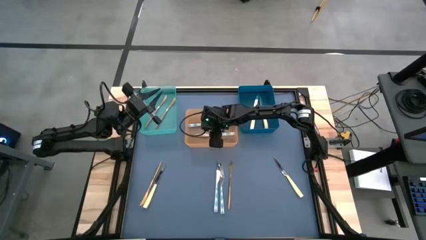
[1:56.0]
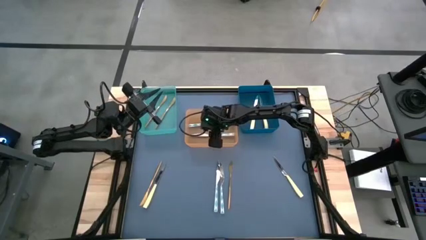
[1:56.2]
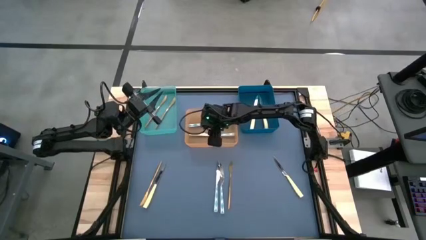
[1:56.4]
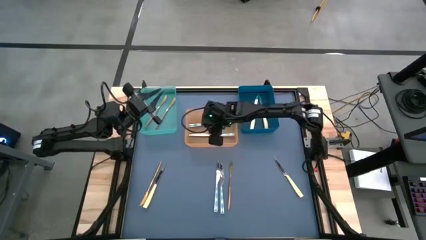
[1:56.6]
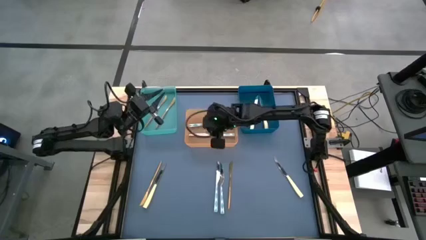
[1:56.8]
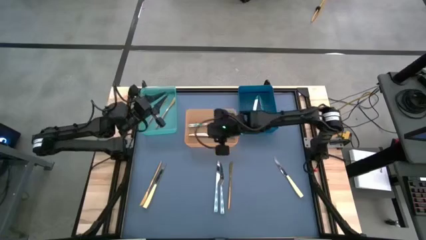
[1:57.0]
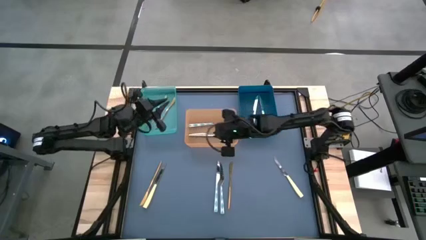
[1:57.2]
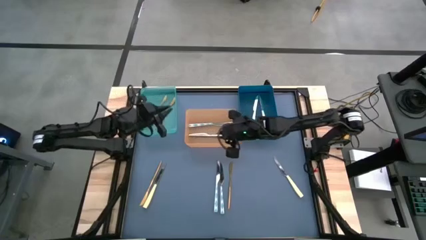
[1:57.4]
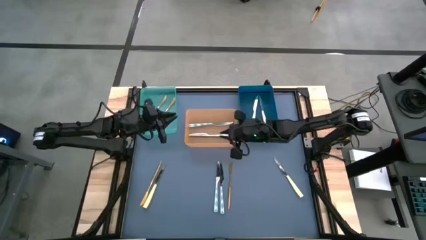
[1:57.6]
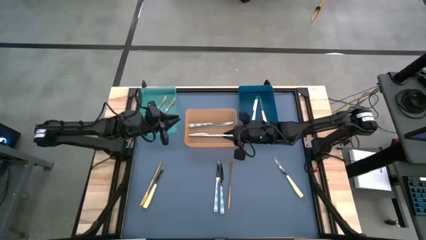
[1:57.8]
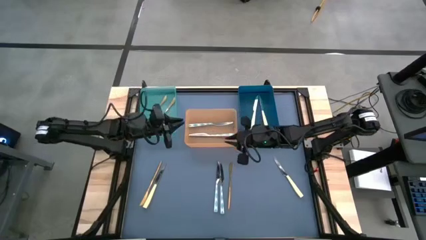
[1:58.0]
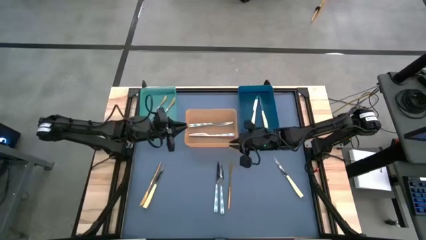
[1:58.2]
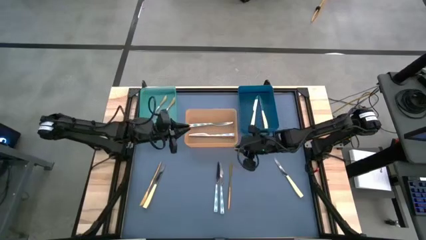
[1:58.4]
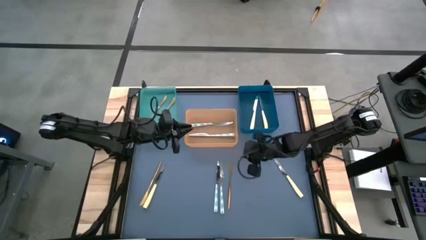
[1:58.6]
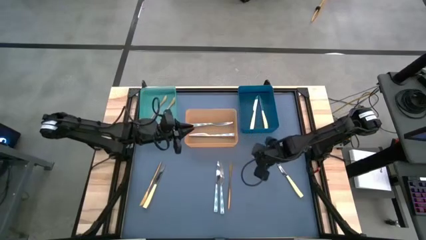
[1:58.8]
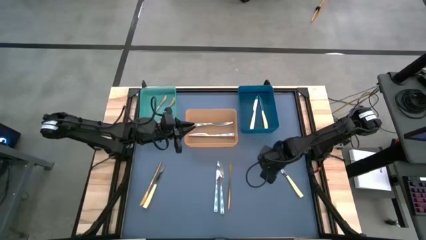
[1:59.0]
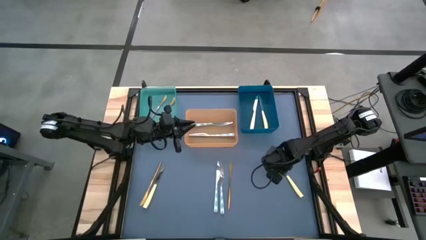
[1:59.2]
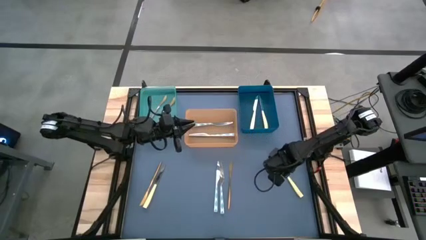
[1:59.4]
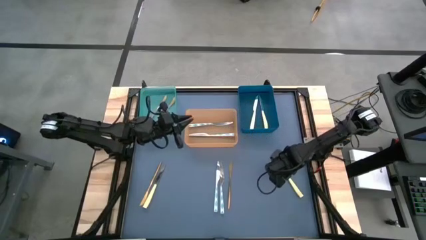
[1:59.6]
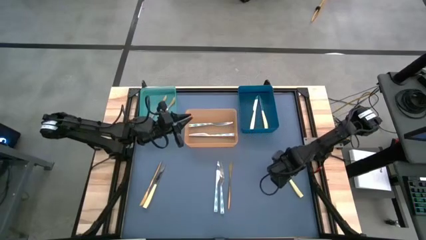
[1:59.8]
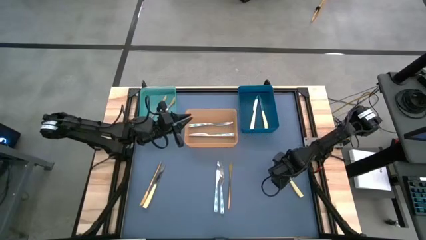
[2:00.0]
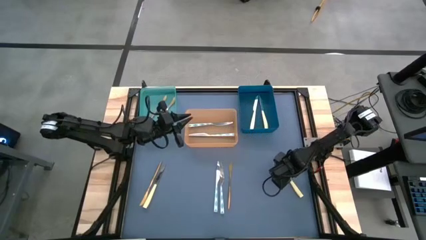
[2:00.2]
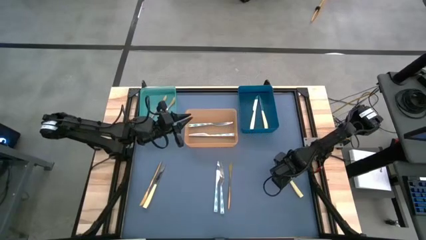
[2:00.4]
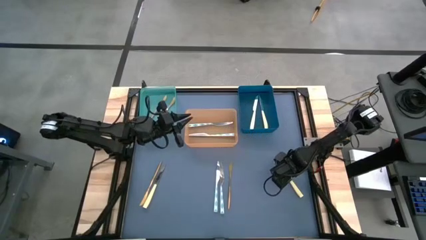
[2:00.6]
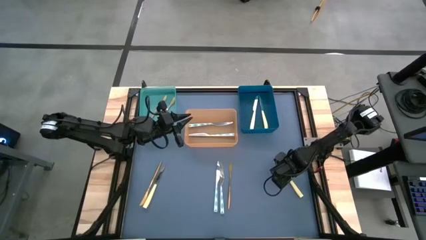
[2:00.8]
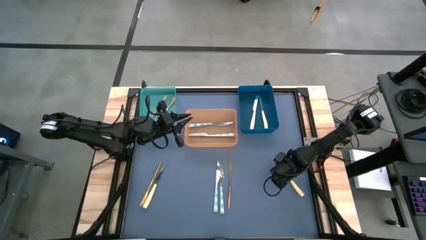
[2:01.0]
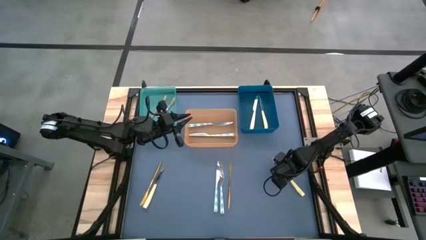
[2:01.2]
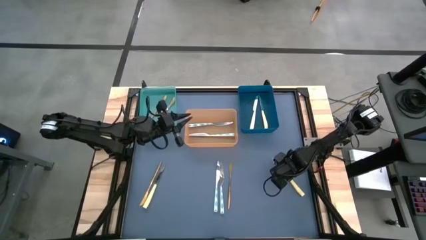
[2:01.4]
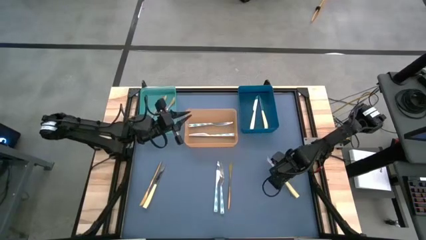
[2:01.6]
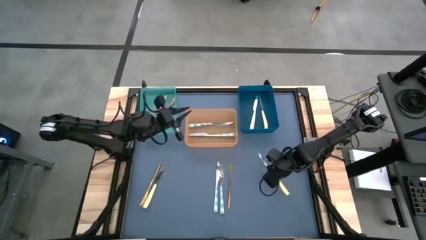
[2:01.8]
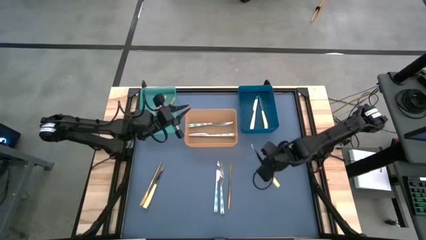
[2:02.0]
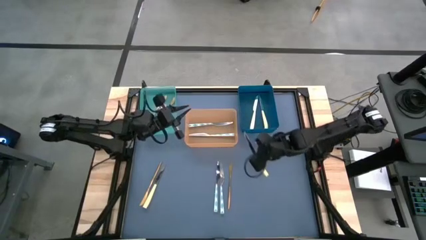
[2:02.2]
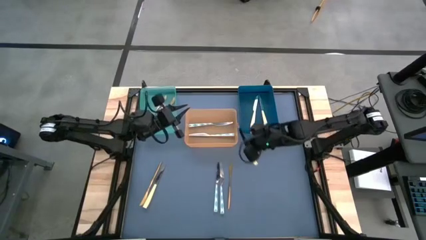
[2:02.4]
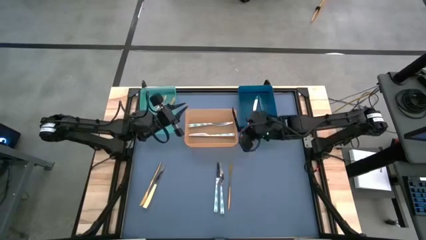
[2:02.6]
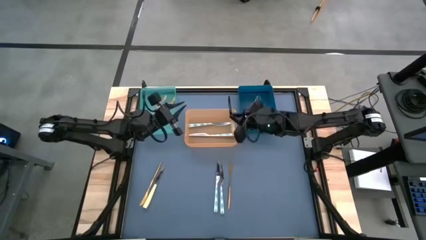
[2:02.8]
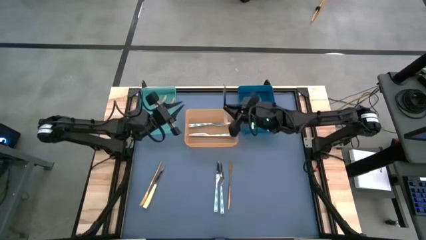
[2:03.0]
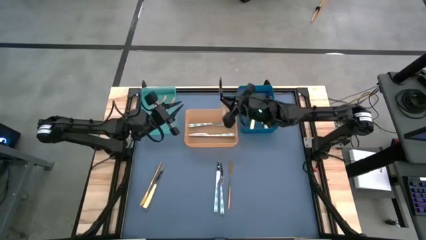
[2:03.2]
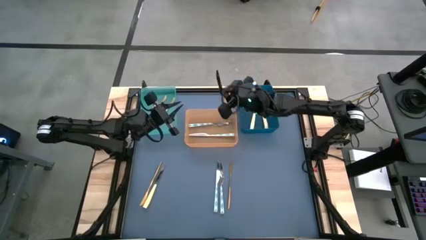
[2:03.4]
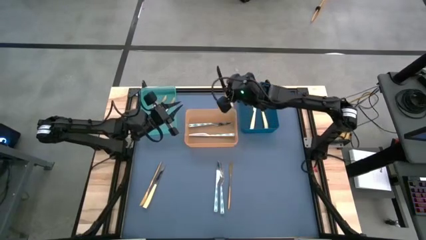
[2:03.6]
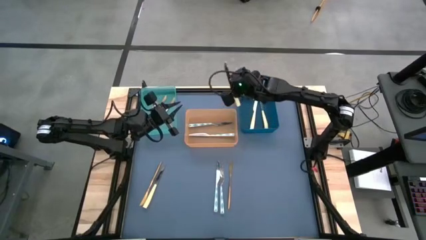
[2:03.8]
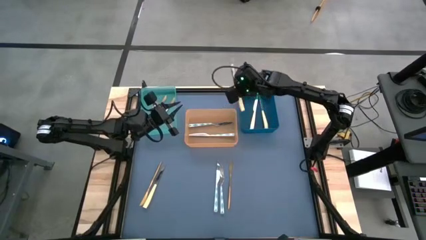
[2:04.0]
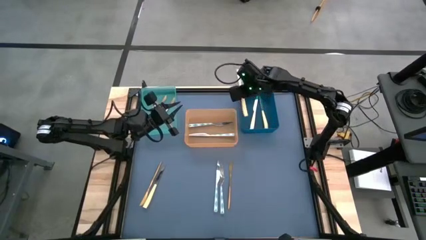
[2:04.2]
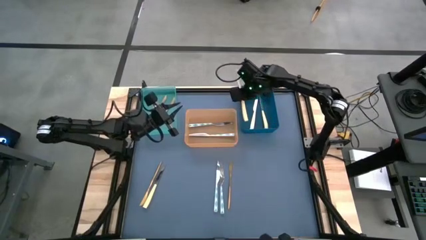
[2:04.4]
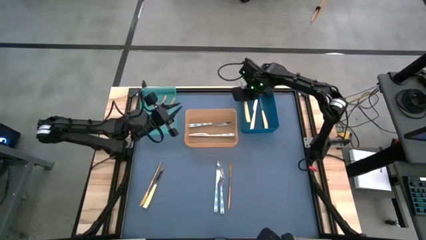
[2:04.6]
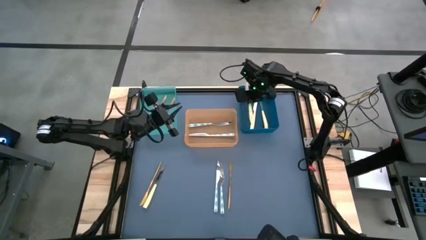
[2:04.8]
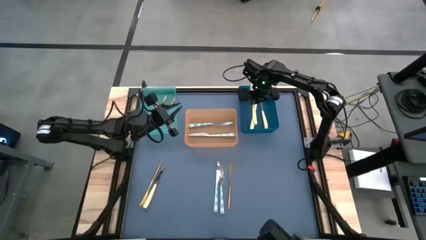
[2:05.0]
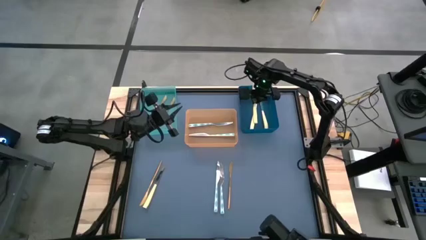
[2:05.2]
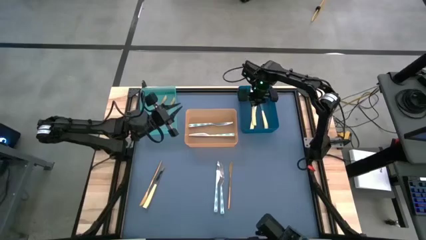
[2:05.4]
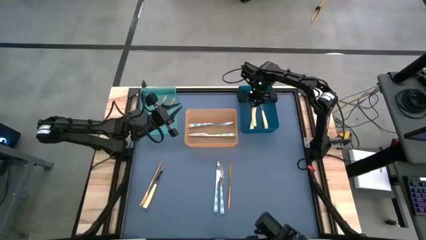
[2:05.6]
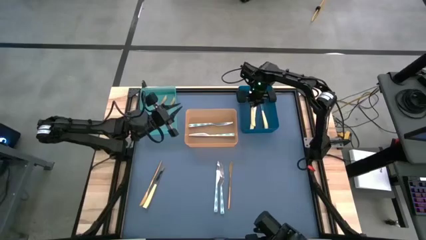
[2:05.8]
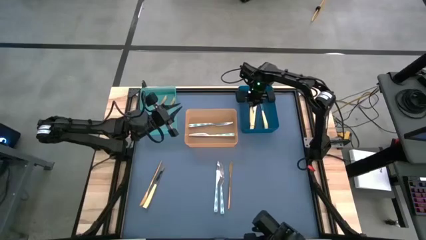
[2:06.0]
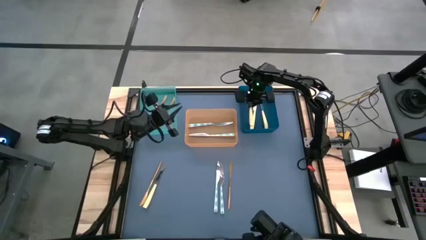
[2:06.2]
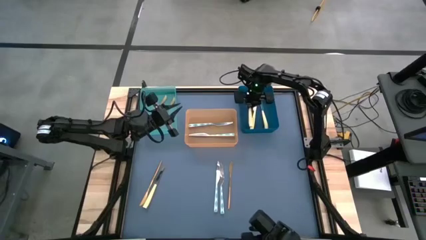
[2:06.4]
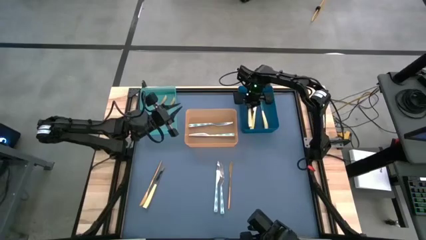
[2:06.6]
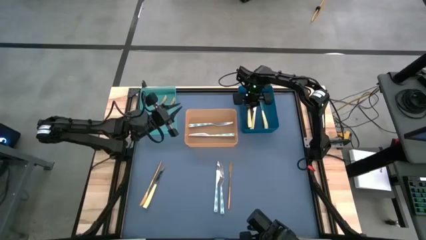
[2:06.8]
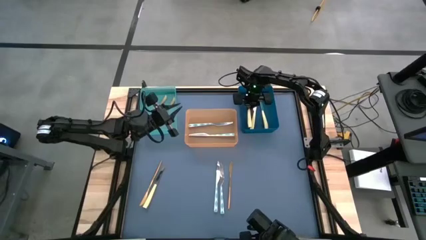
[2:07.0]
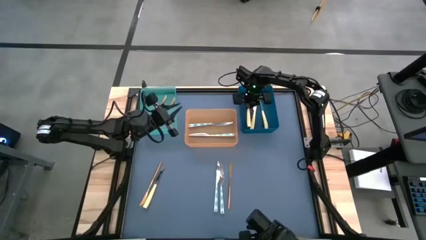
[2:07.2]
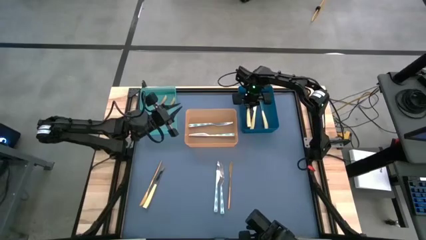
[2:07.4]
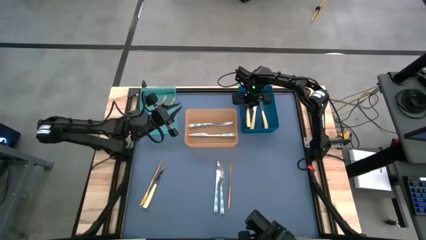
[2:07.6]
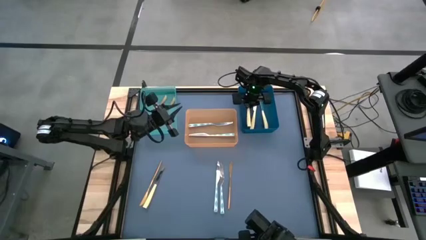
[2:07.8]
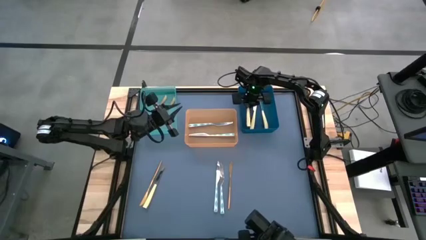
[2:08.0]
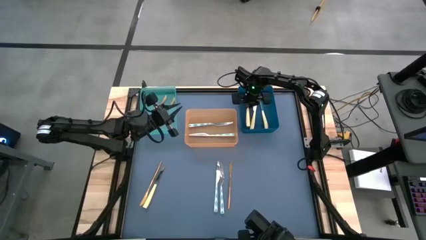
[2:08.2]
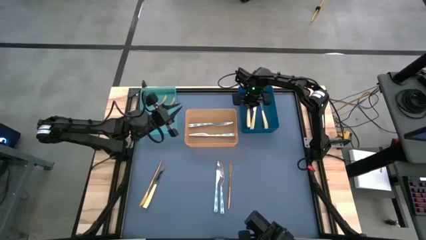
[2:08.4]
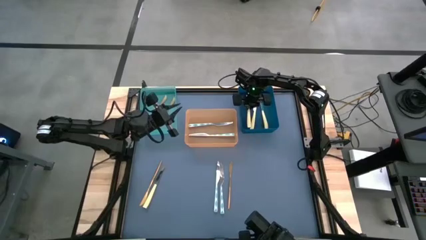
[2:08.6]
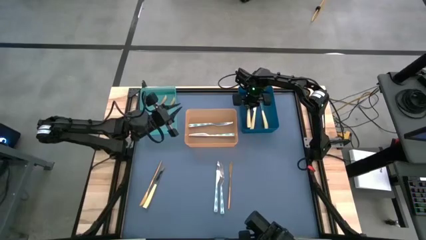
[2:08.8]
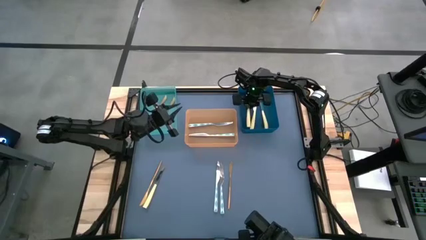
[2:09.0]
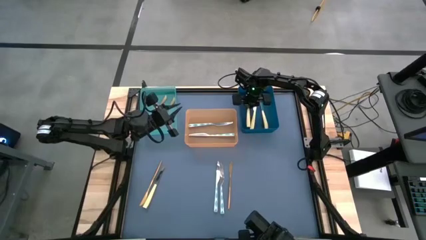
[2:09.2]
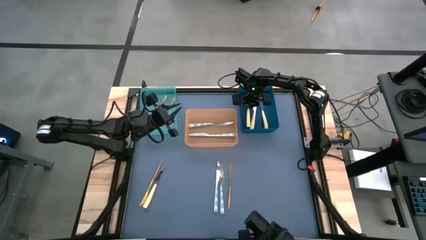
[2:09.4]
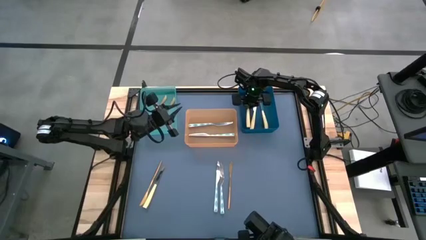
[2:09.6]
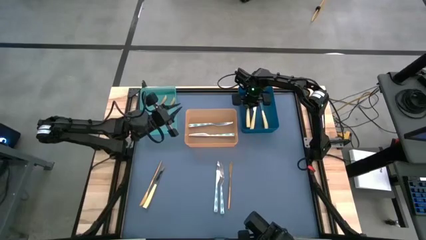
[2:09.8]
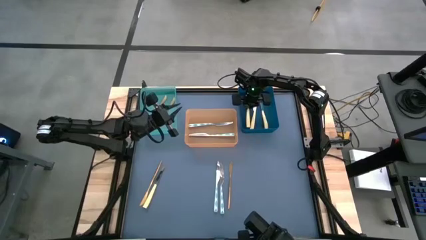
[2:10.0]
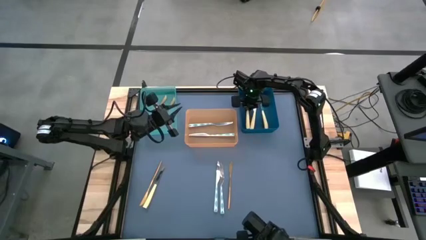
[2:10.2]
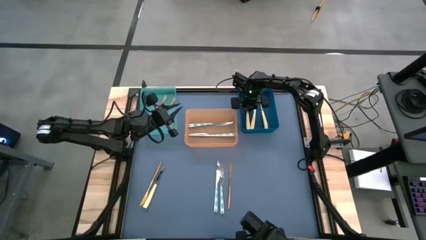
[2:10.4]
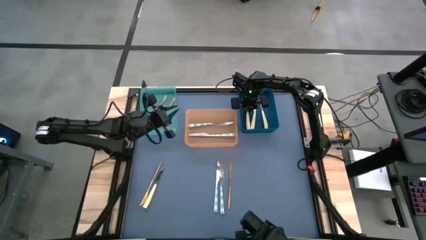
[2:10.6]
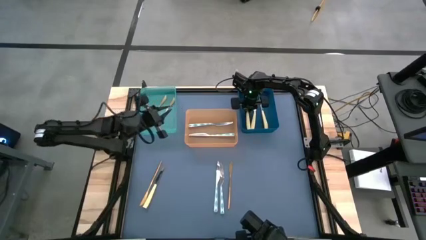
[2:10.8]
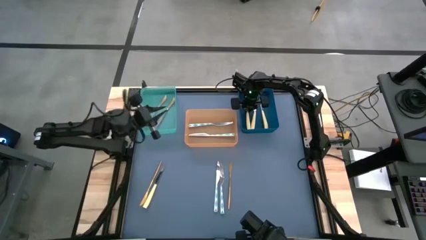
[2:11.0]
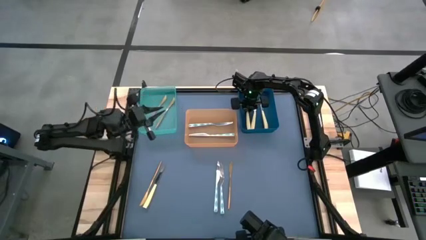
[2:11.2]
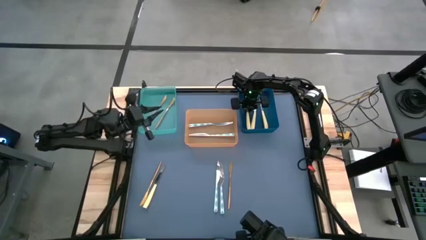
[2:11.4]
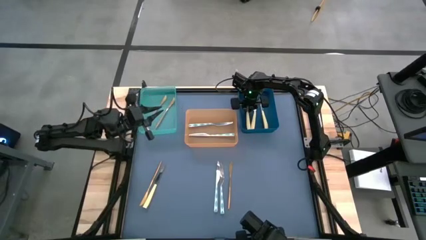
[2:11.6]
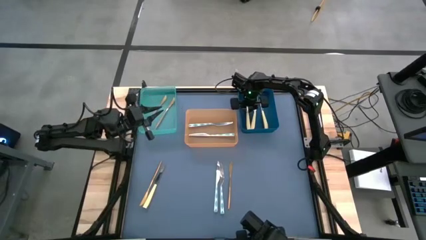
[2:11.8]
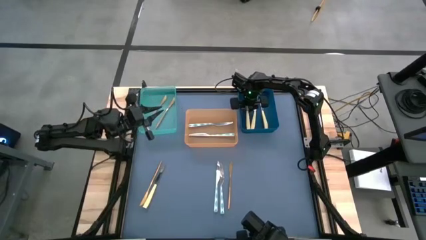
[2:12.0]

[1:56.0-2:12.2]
Task: Sort silverware by color (type)
Put the yellow knife into the blue bin

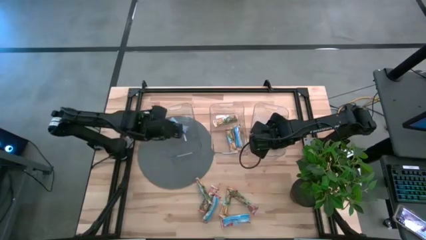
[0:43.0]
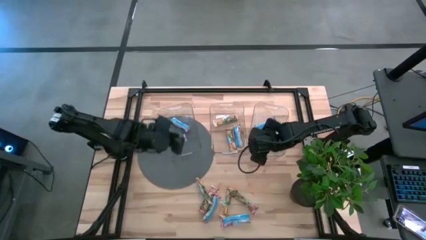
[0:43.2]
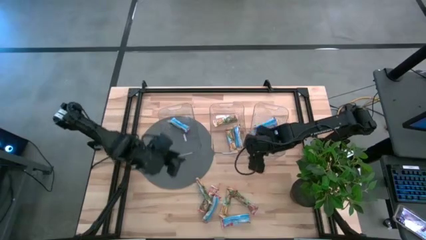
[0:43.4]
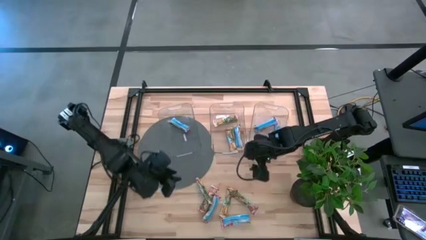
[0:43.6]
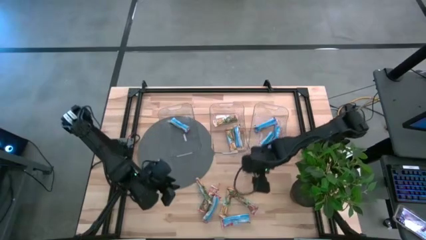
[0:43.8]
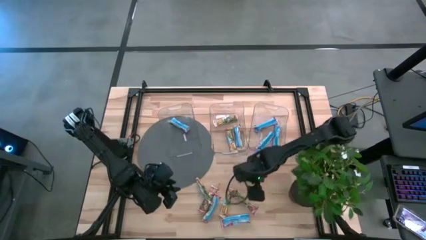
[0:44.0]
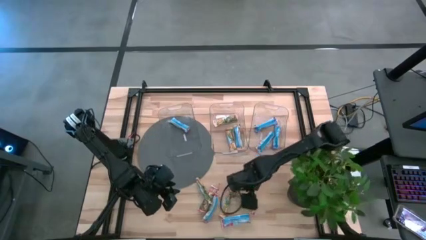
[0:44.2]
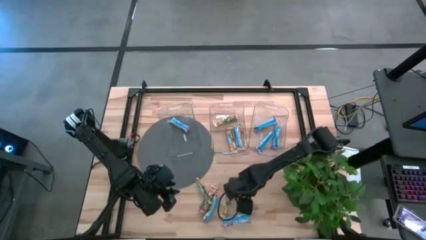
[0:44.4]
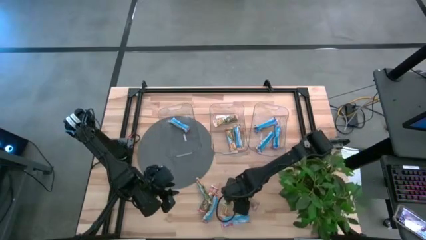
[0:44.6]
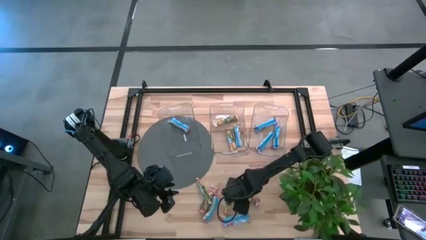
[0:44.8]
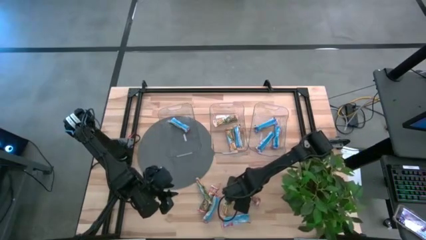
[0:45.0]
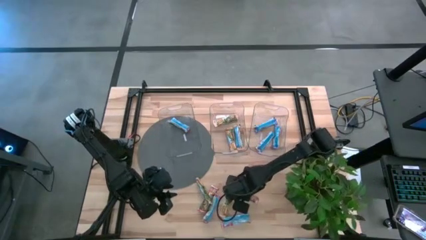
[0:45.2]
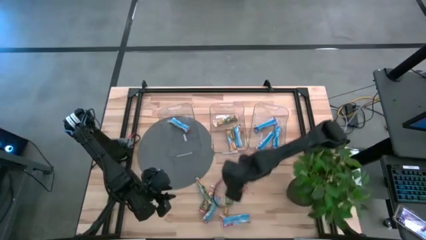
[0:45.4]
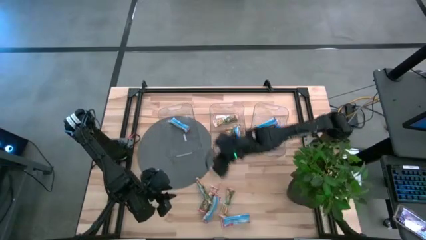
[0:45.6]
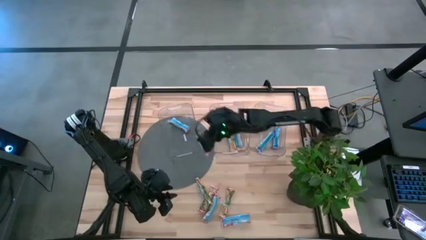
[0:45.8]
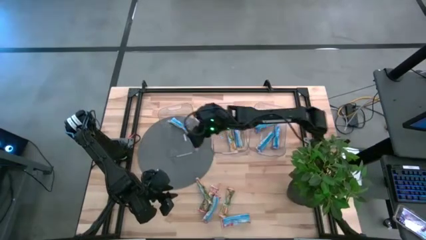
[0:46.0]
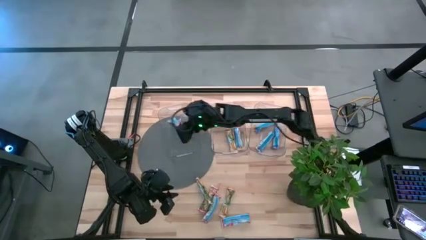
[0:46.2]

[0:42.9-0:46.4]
Task: Pick and place Granola Bars by type
Put the red granola bar into the left transparent bin
